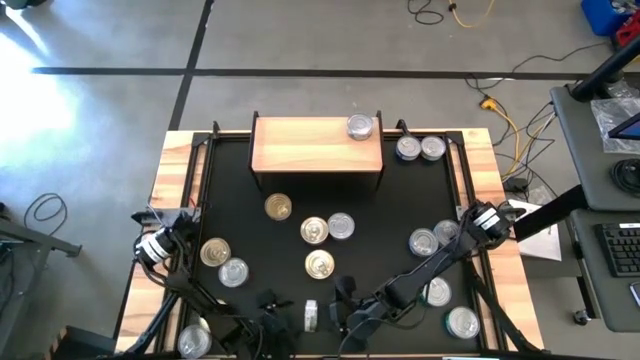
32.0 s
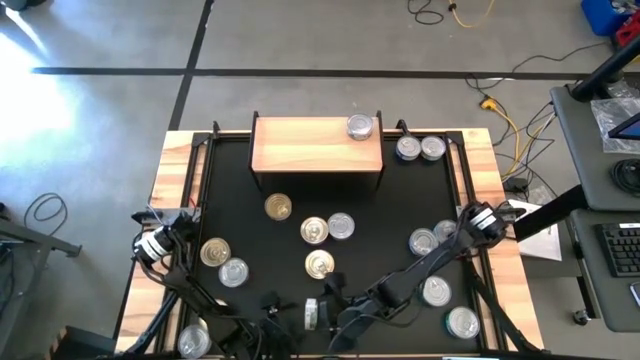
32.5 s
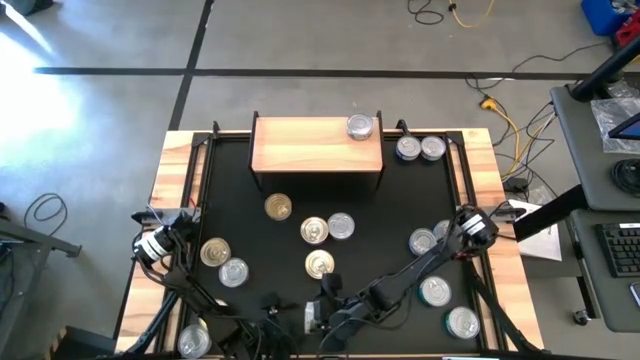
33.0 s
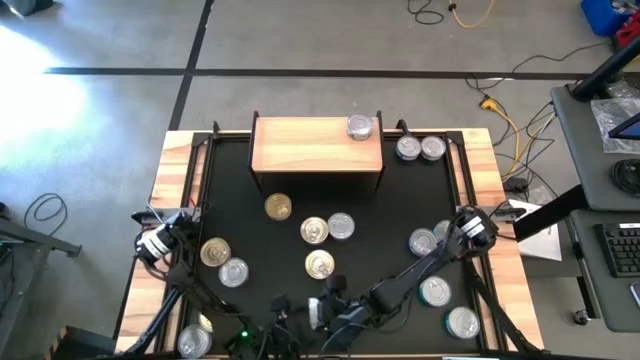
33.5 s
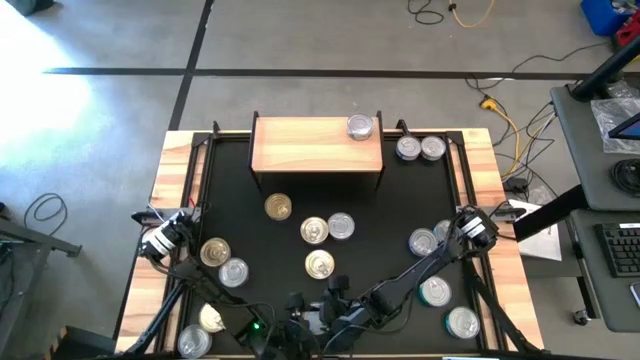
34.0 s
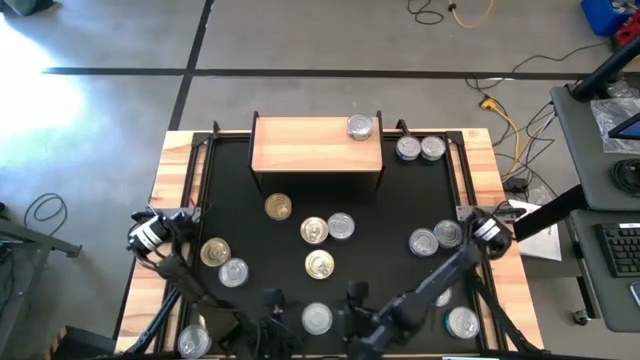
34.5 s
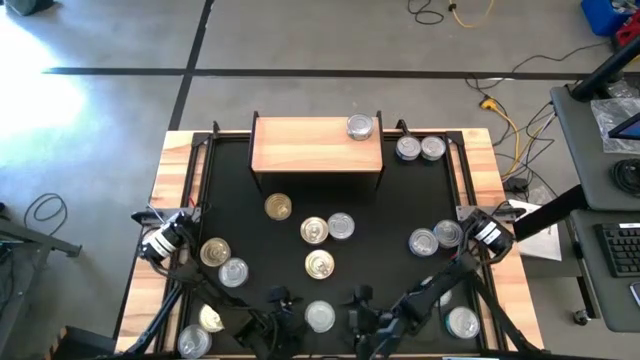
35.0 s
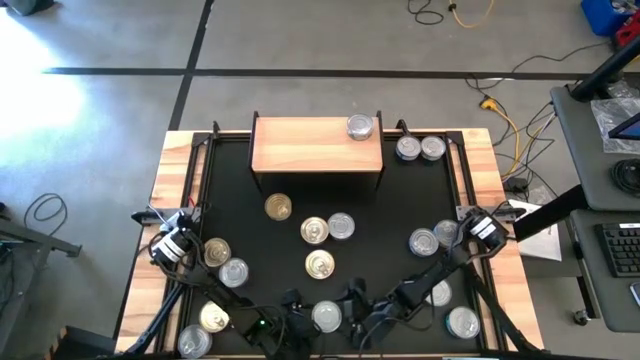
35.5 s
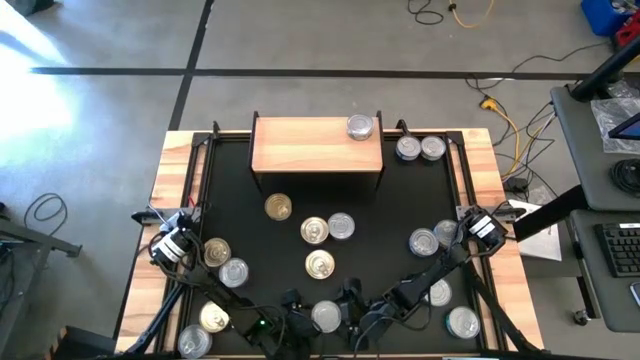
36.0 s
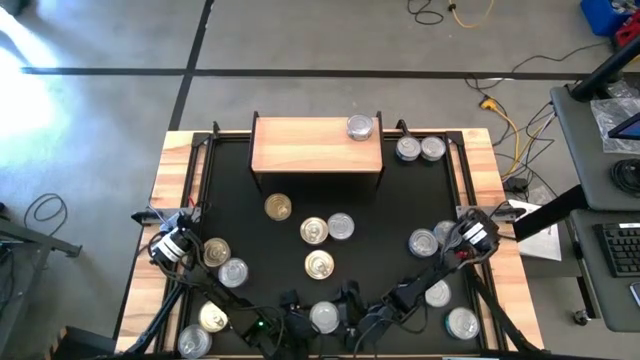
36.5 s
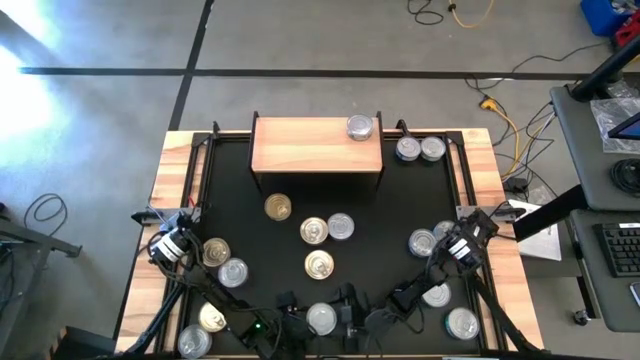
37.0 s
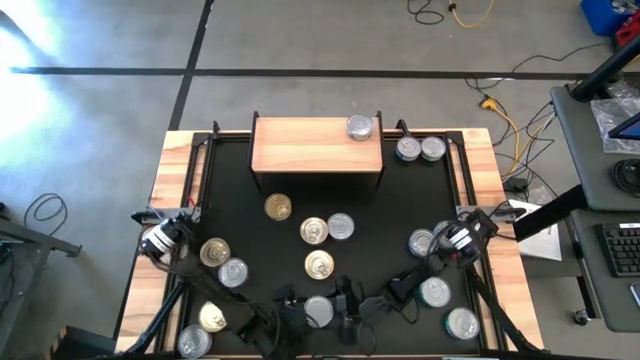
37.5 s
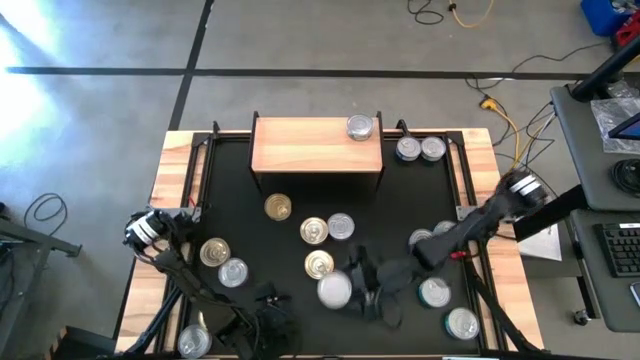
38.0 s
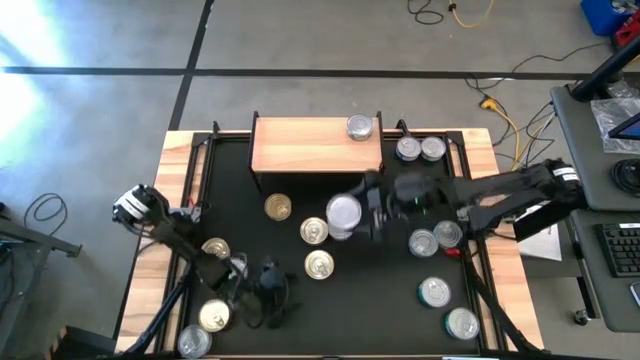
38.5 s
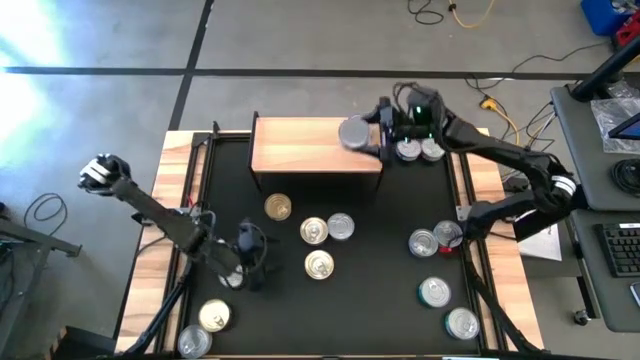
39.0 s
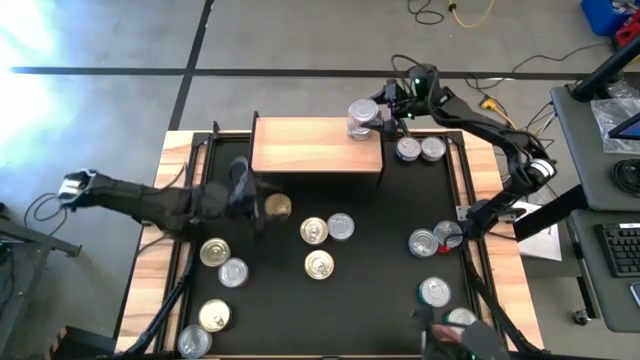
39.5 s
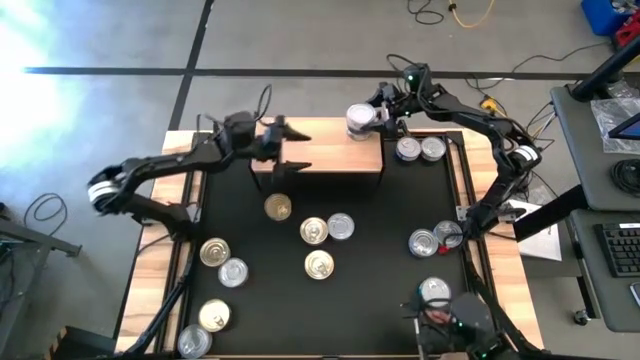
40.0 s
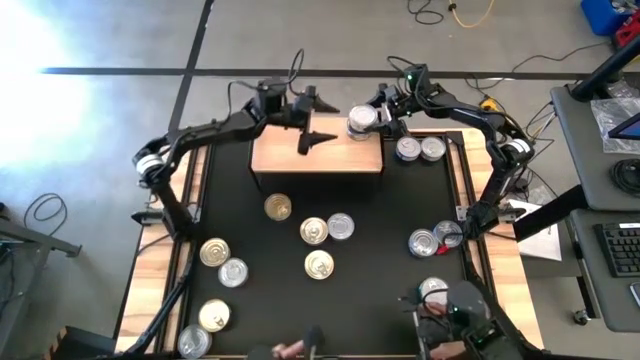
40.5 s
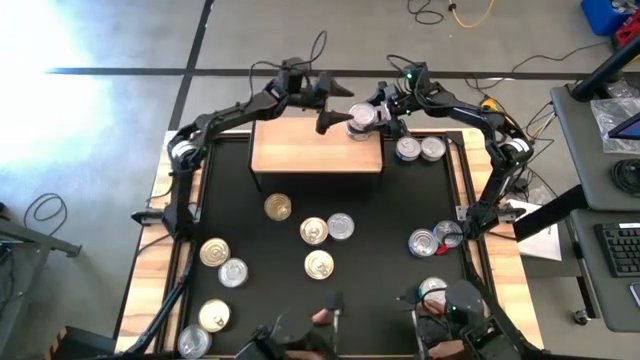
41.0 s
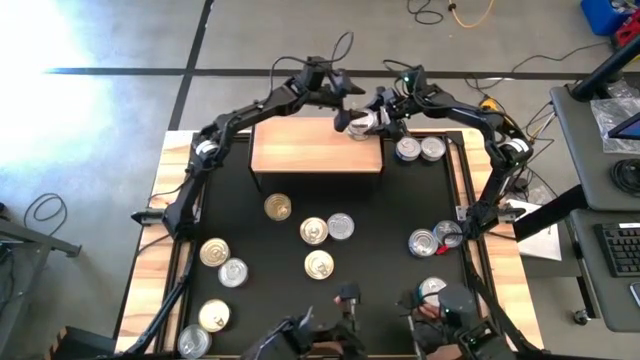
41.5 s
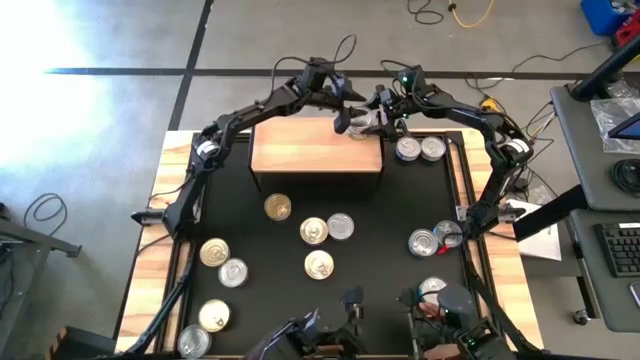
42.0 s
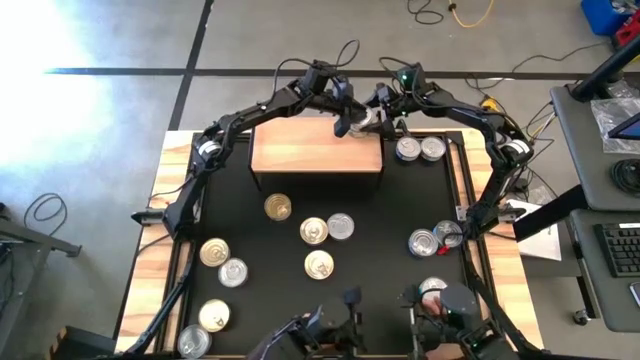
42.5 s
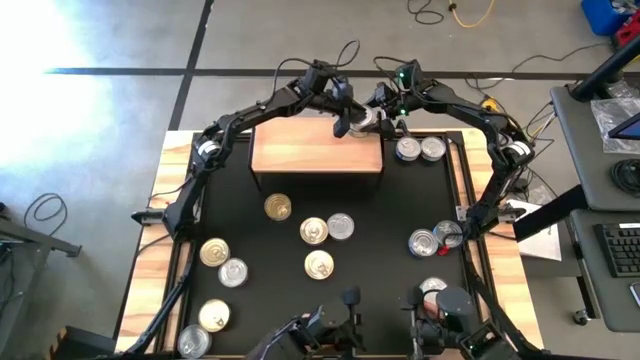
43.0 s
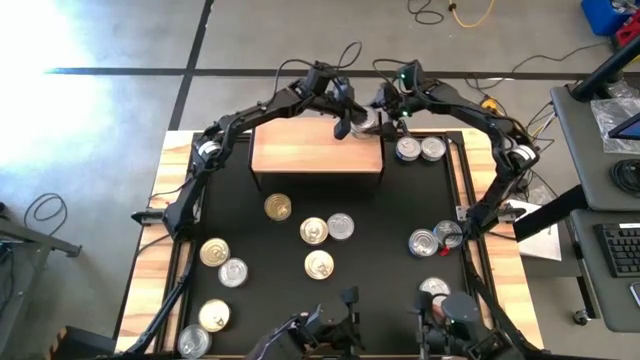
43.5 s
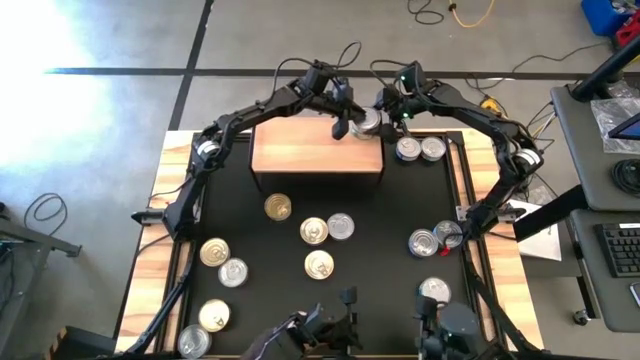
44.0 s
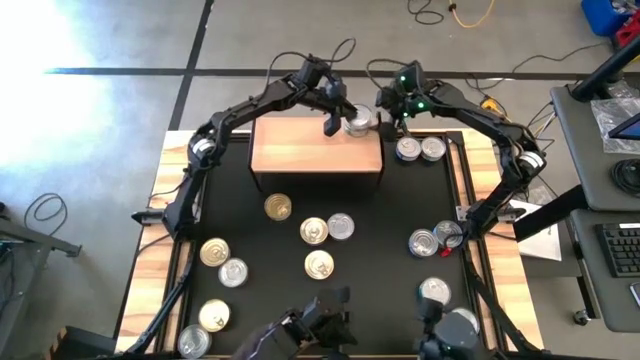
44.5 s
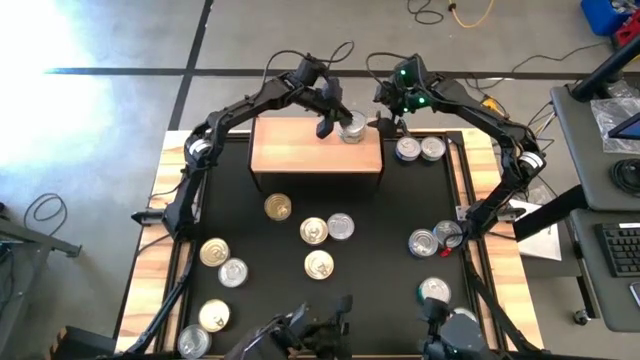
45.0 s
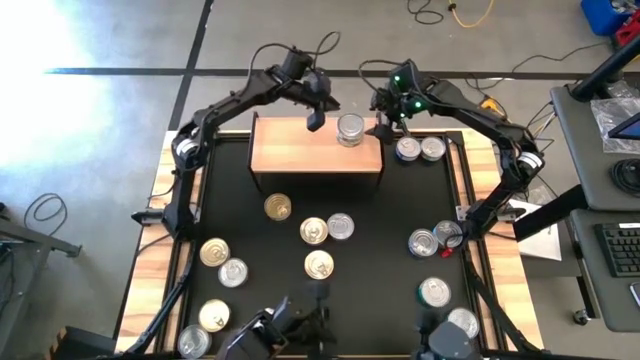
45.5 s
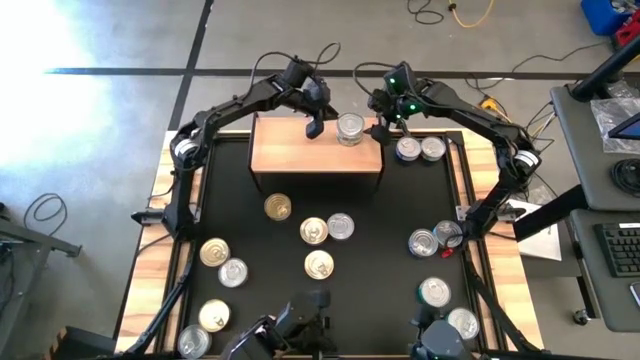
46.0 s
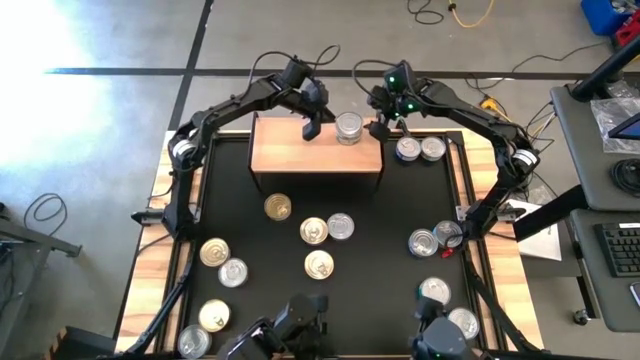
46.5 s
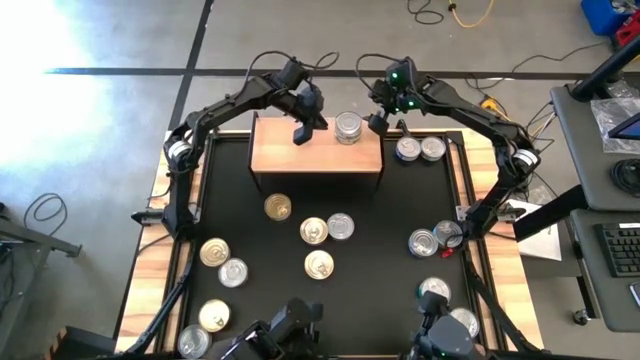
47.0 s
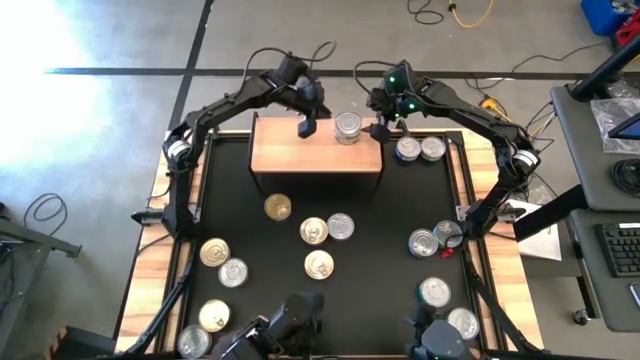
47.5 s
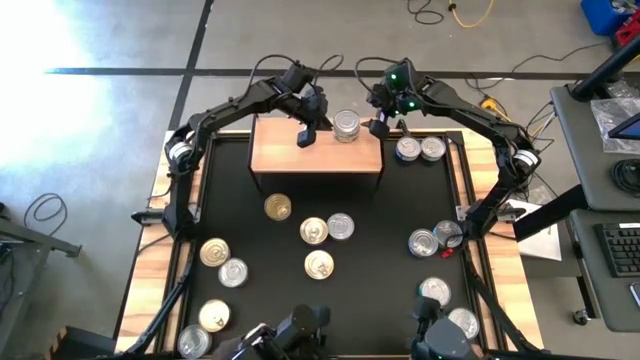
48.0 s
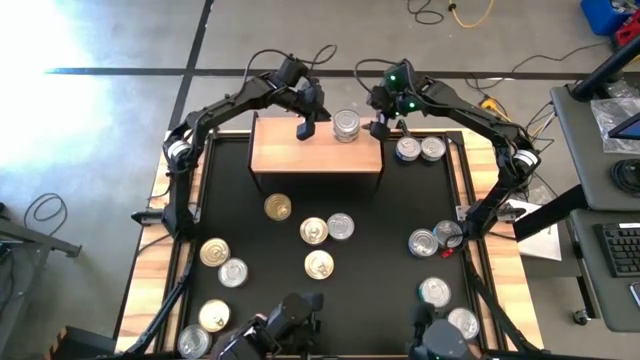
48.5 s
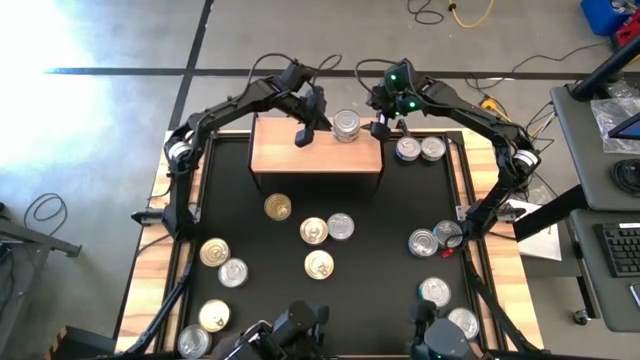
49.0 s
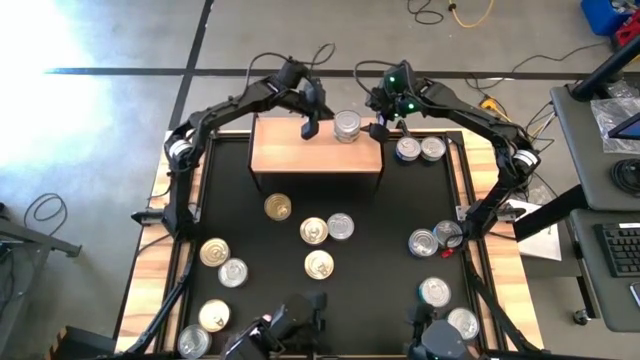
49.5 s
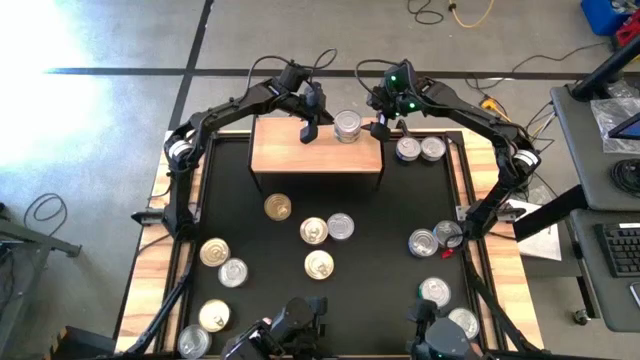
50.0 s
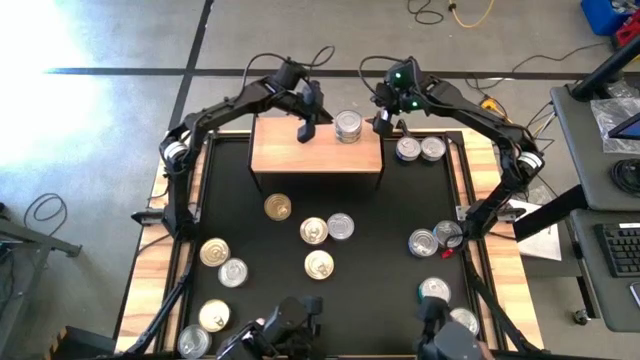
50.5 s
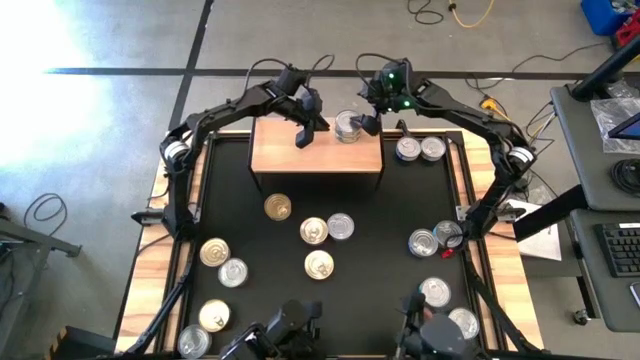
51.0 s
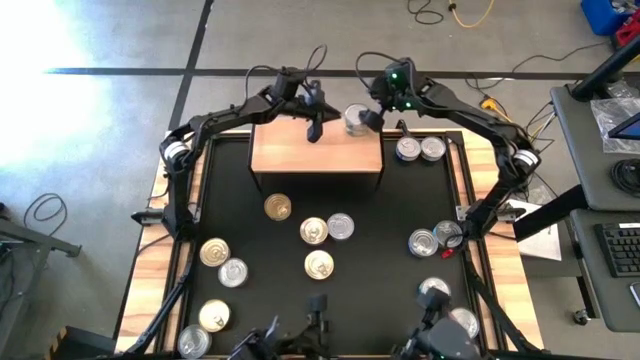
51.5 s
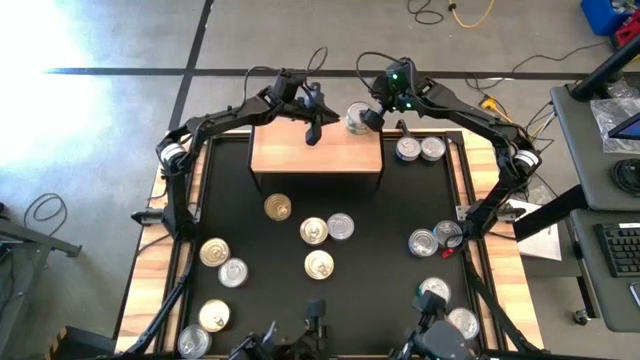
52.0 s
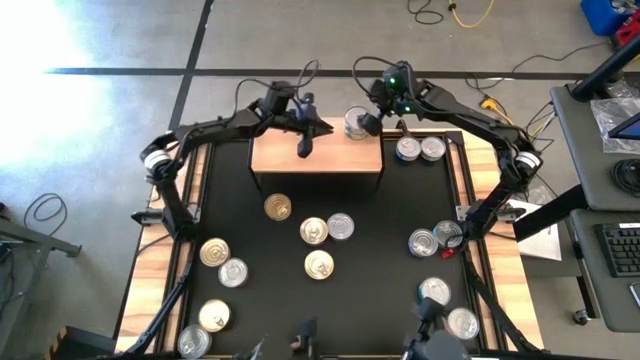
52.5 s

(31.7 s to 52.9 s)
Task: Stack canned seafood by type on shelf
Stack the light green tuna can on top of the light green tuna can on the shelf
